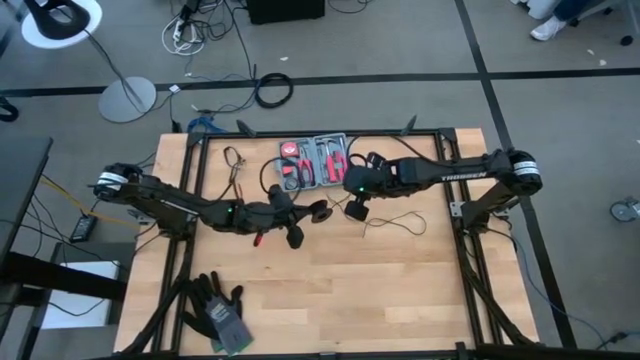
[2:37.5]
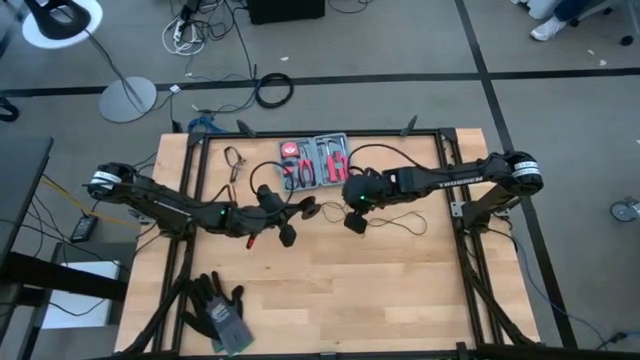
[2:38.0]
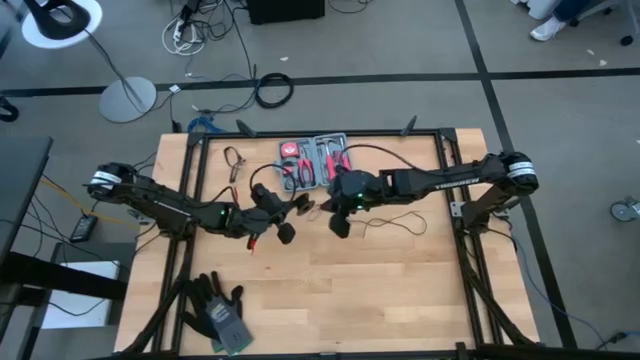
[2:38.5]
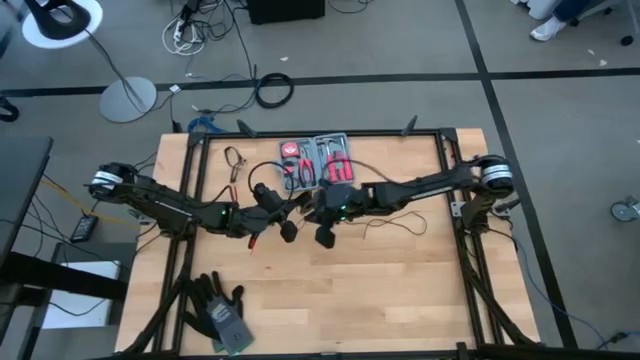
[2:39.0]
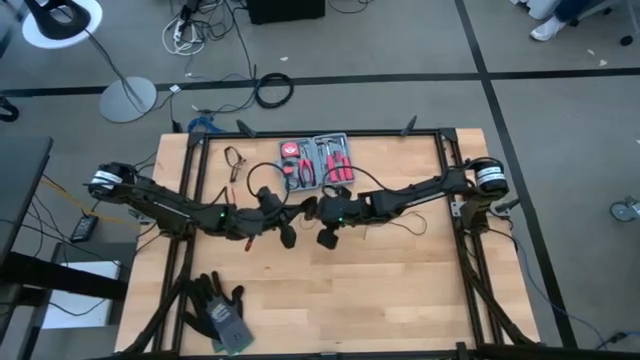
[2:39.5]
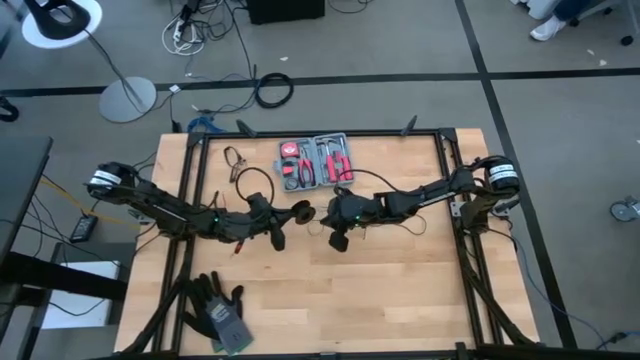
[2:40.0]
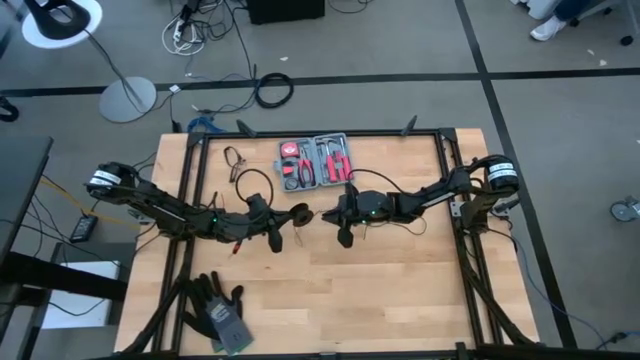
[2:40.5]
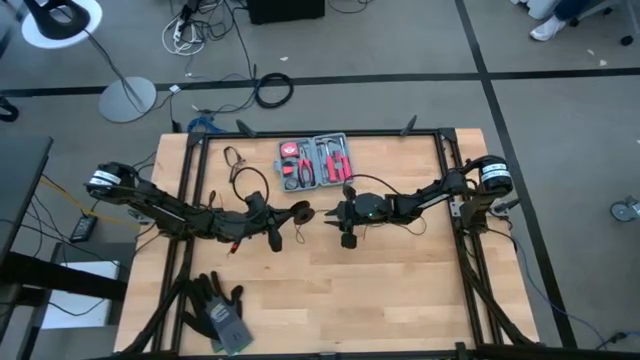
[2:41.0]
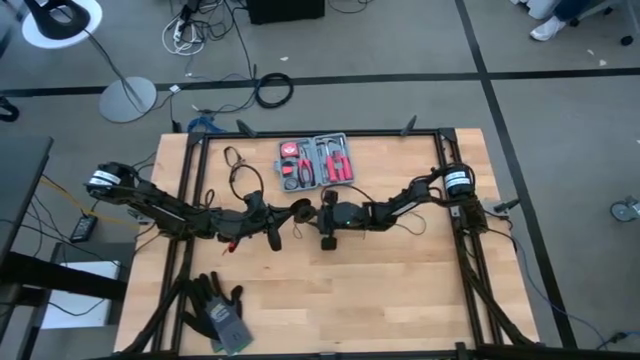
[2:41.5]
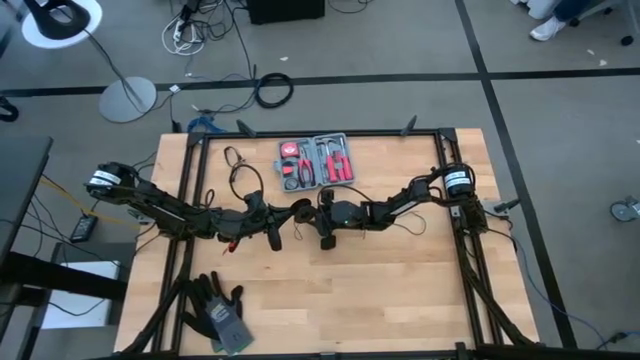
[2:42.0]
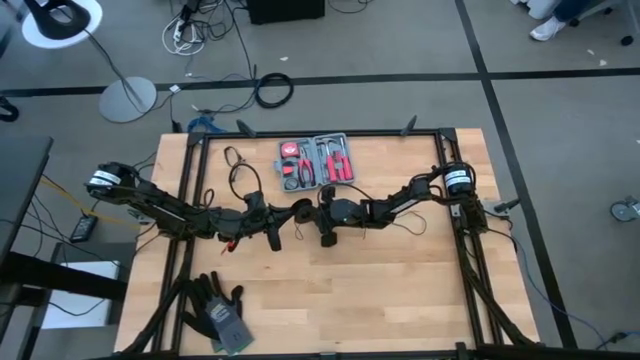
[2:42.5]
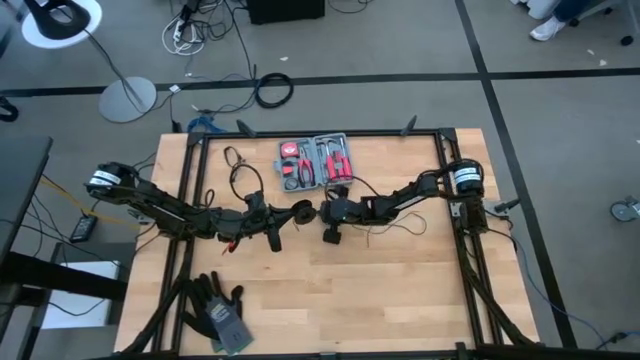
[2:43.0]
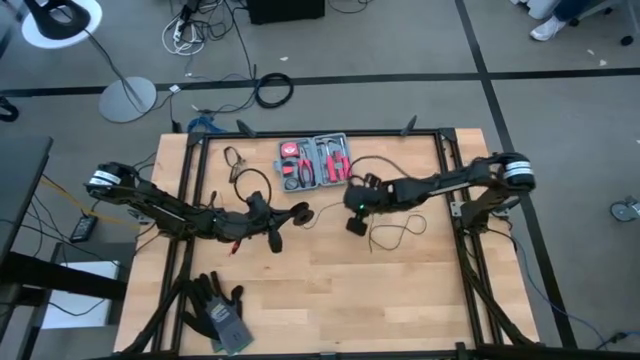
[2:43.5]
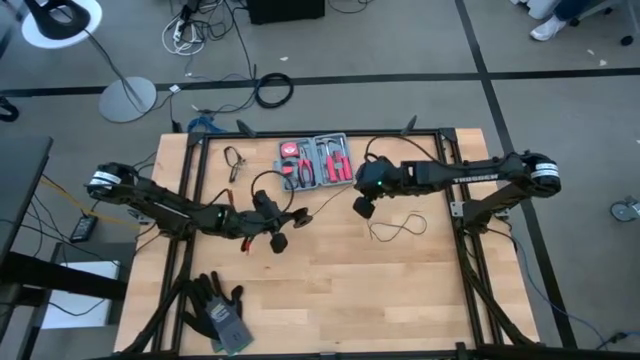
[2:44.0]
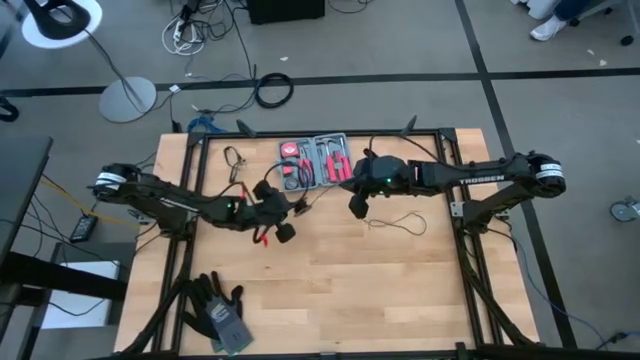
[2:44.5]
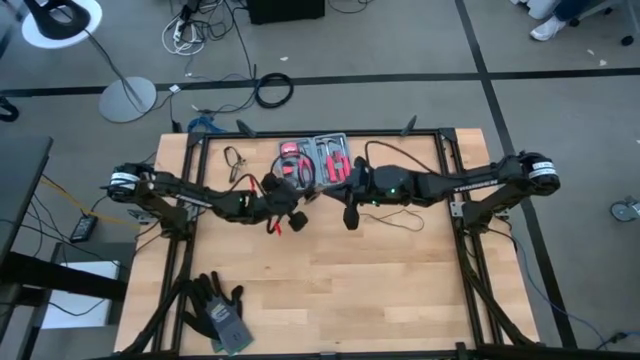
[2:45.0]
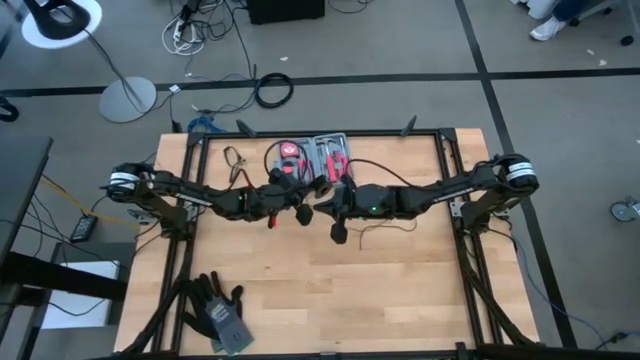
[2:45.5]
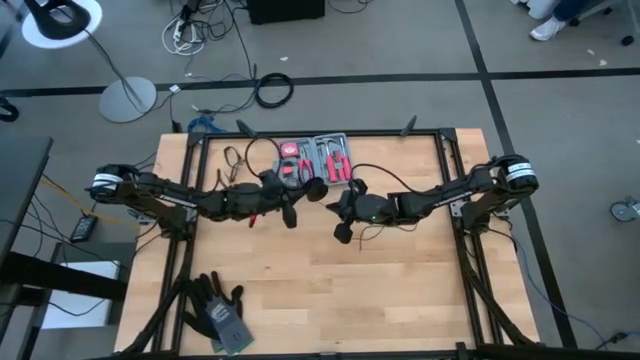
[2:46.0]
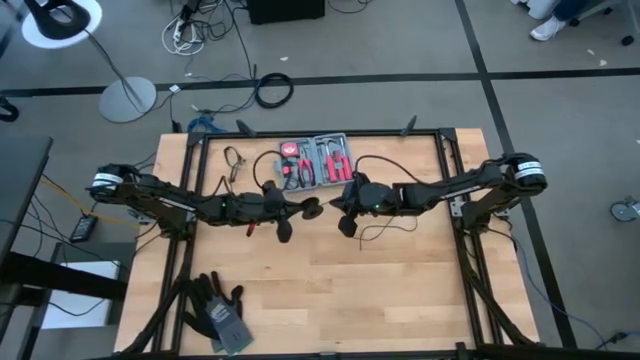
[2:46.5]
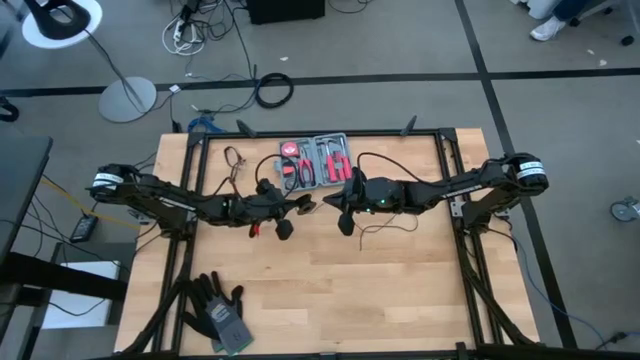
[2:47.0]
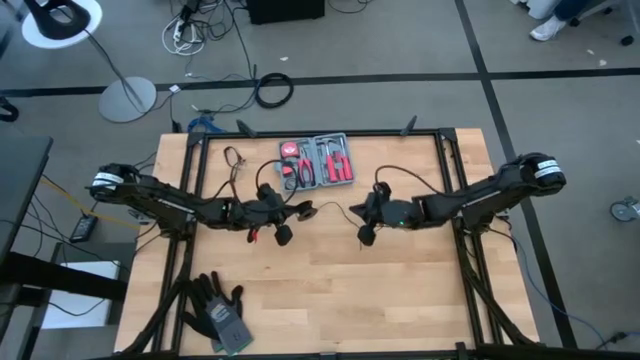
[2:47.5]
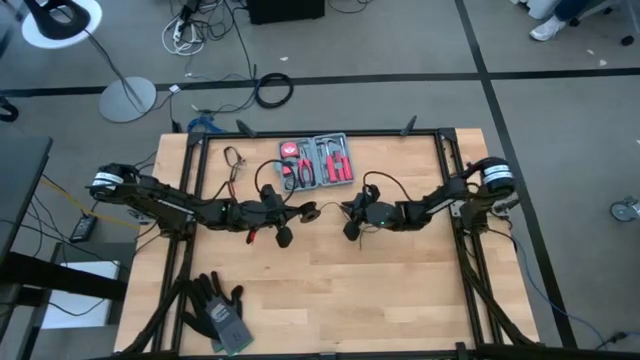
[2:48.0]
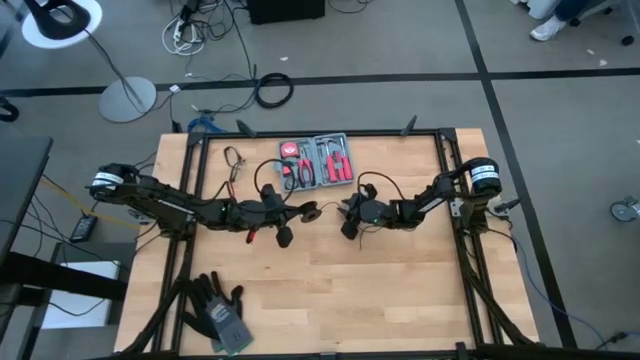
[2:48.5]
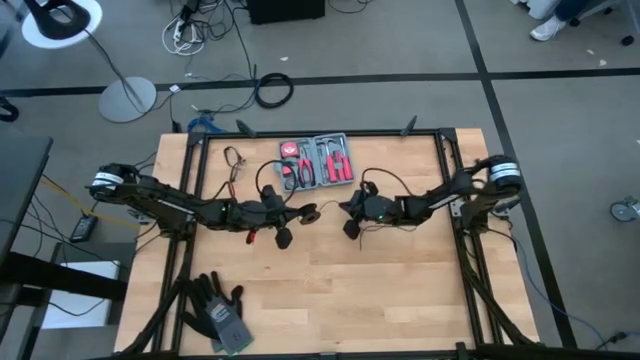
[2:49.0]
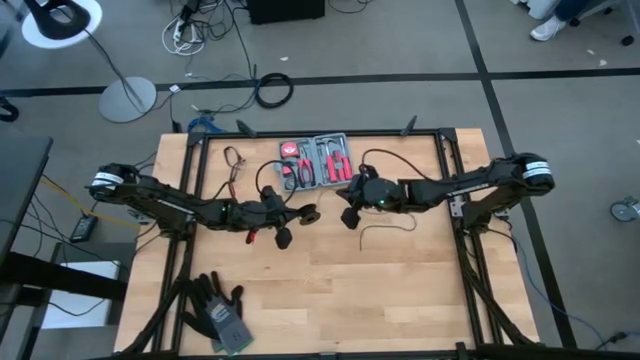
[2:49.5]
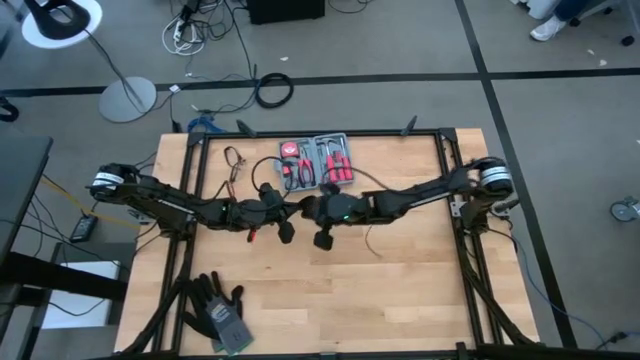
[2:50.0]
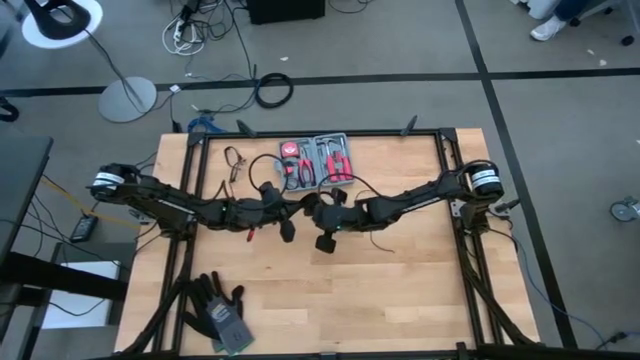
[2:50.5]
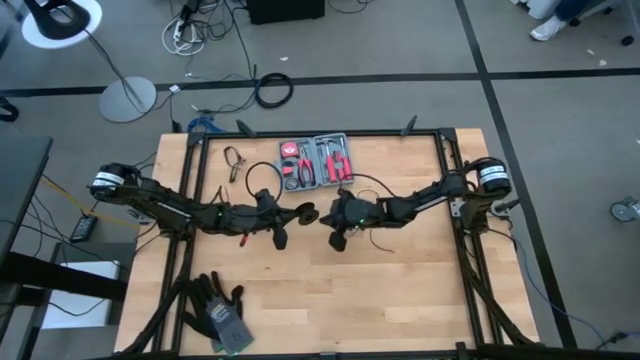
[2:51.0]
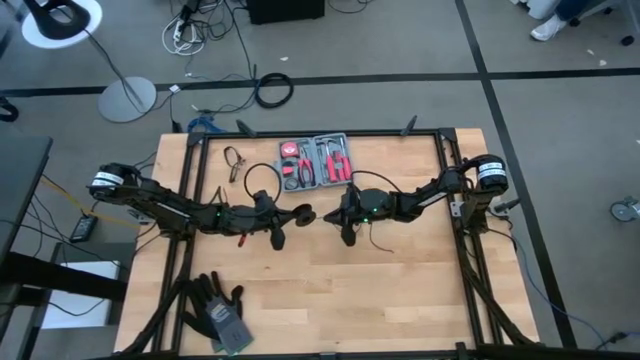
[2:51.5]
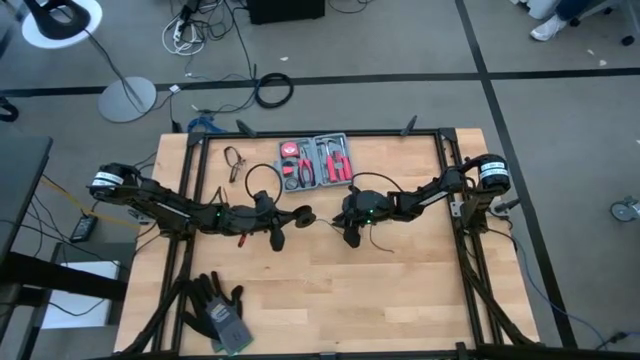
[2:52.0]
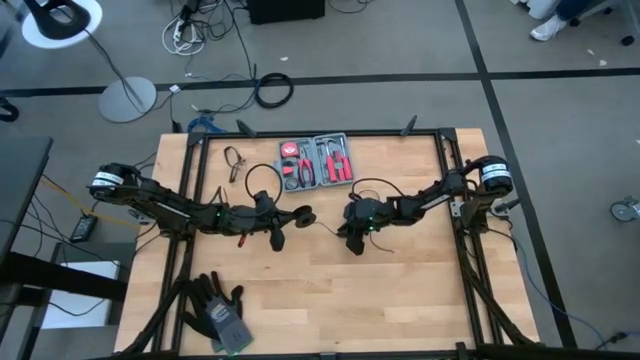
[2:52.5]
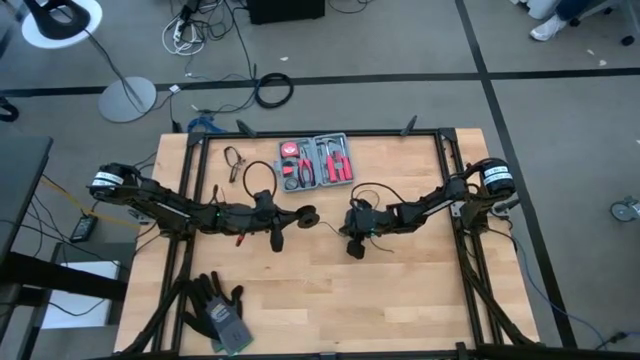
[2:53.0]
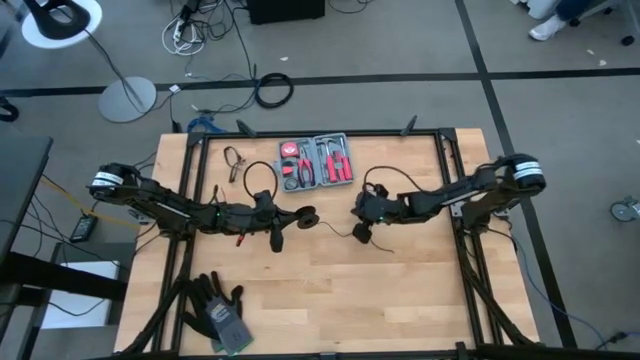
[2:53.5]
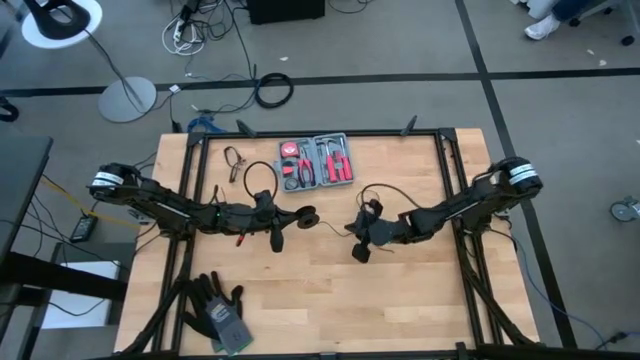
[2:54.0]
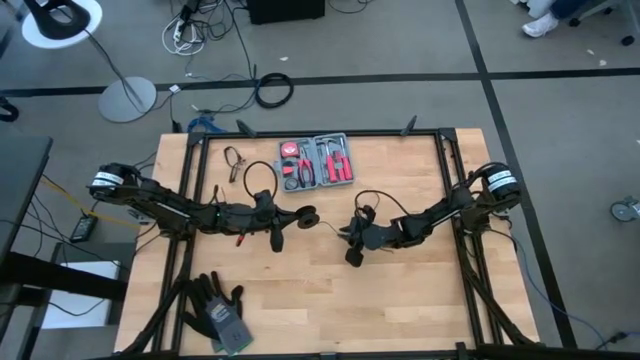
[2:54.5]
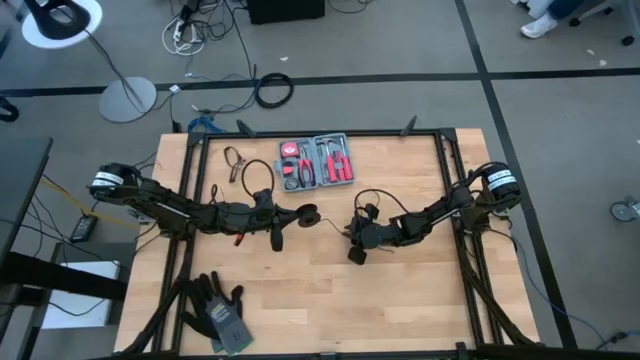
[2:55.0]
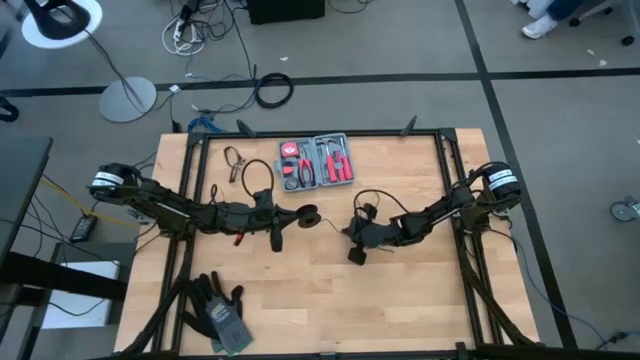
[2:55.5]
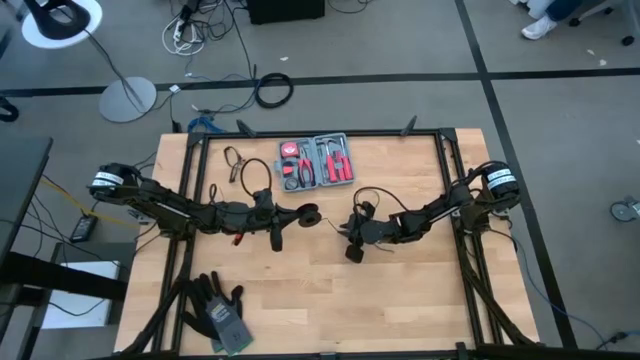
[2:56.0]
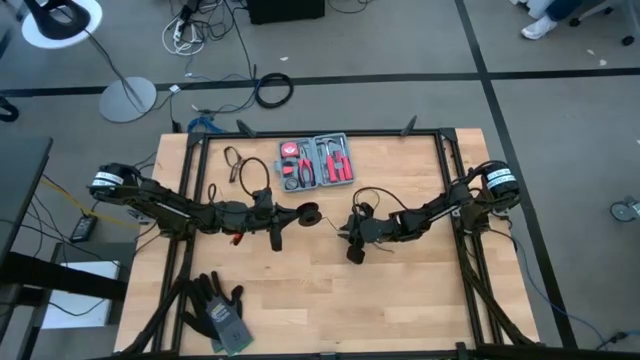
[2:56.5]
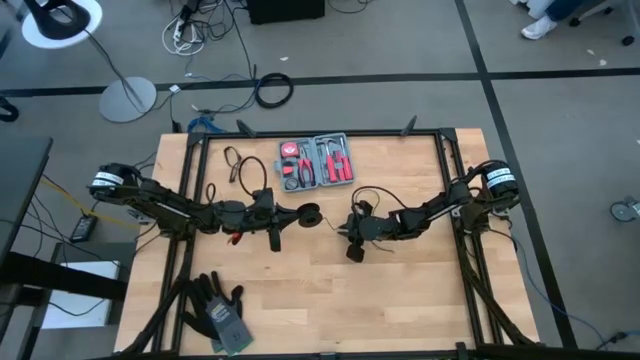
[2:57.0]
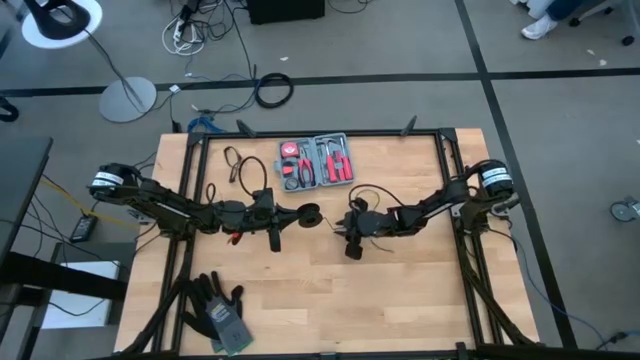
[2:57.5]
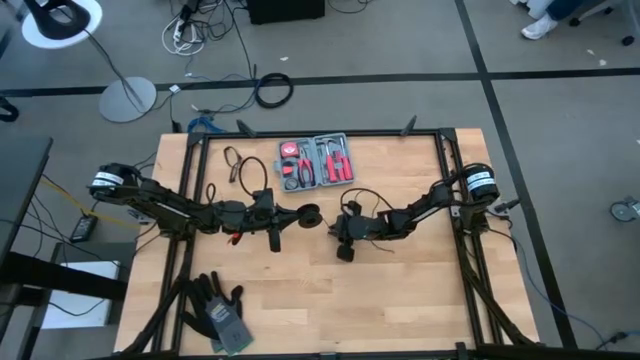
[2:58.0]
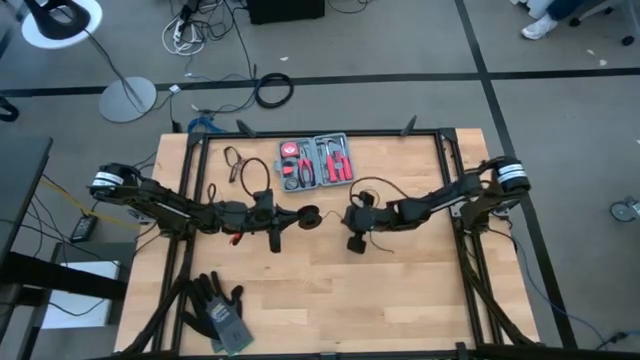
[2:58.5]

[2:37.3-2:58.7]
Task: Coil cords
Coil the black wire onto the black spool

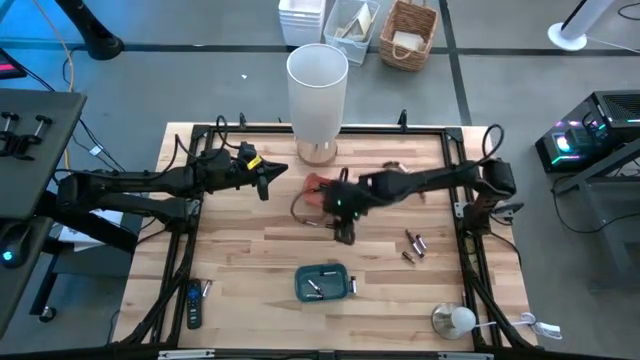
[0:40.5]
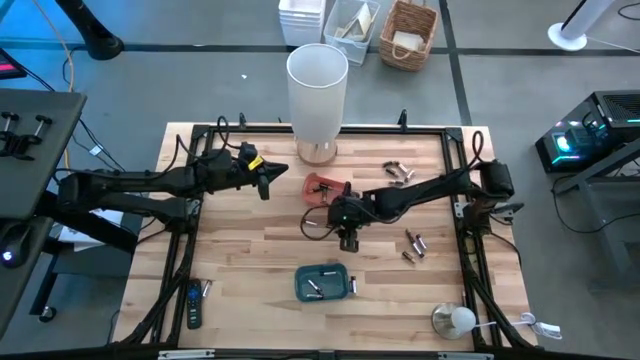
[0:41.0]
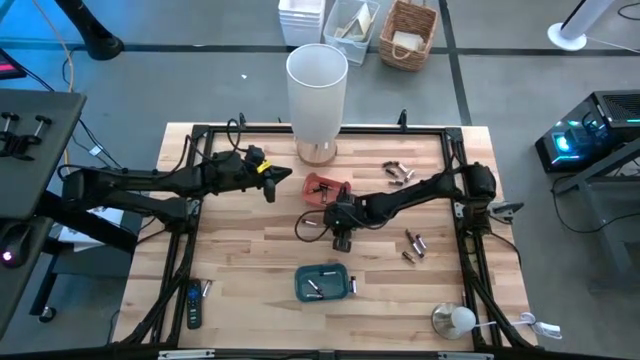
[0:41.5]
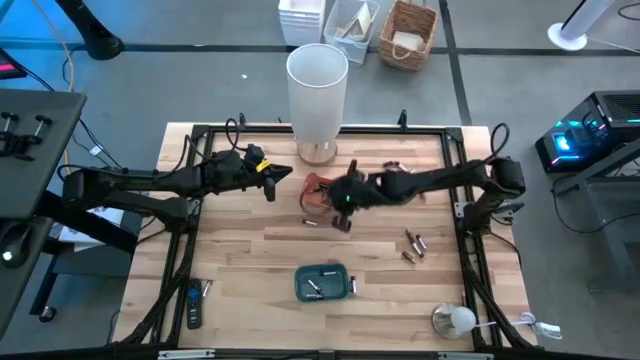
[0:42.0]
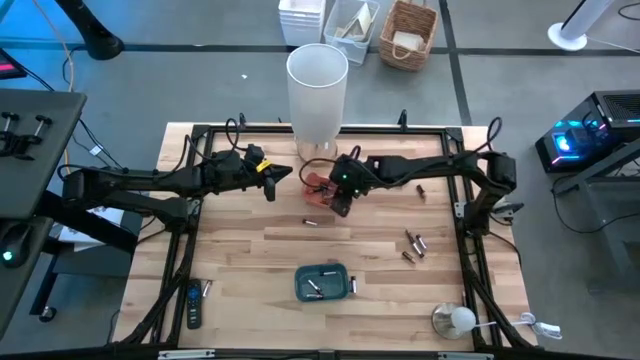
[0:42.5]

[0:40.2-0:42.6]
Task: Sort batteries
Put the black battery into the orange bin
